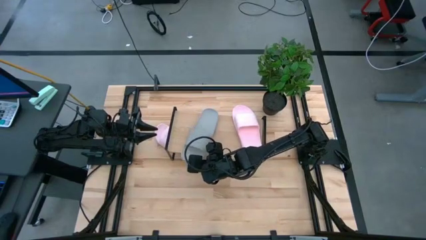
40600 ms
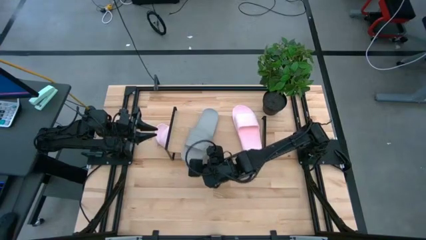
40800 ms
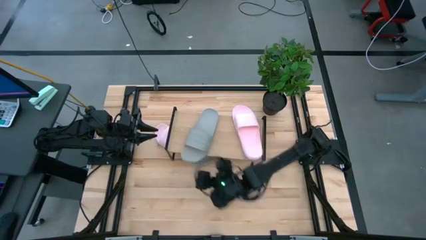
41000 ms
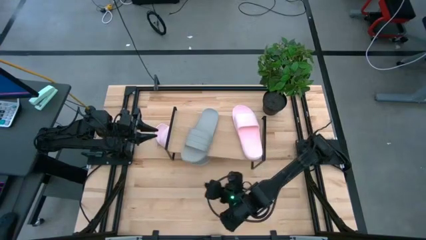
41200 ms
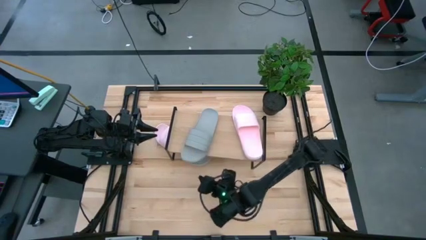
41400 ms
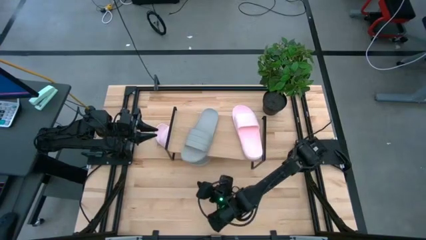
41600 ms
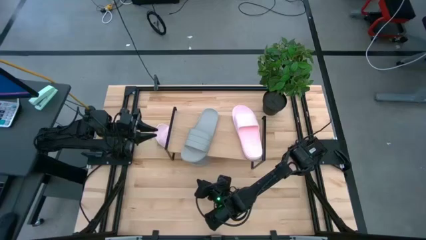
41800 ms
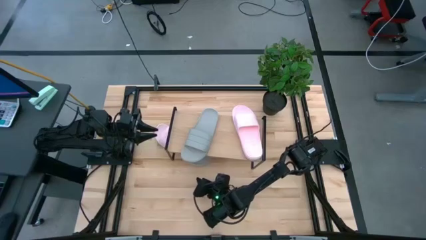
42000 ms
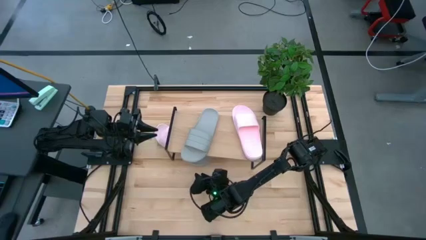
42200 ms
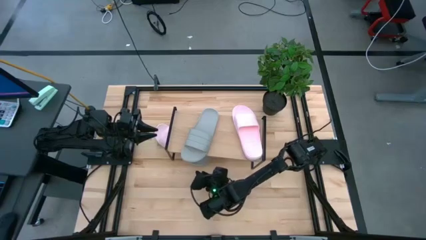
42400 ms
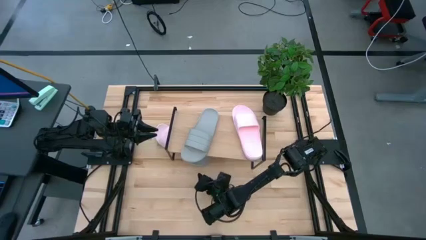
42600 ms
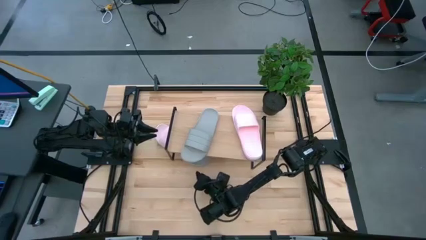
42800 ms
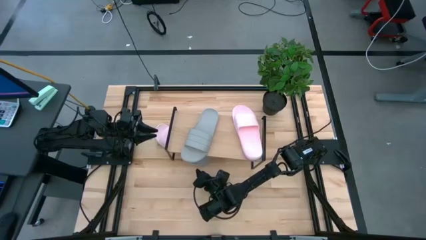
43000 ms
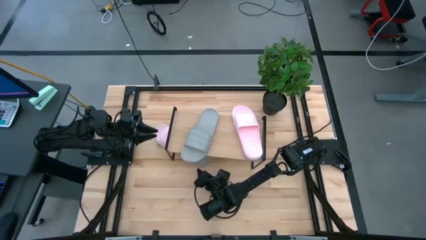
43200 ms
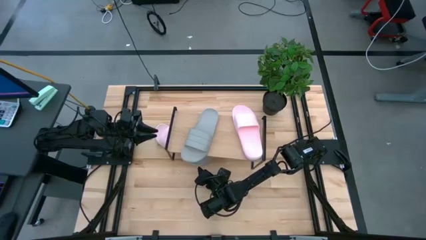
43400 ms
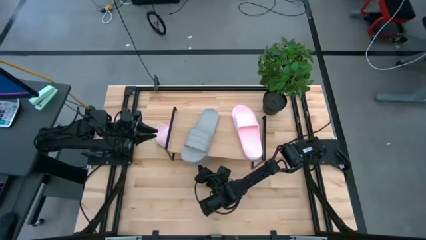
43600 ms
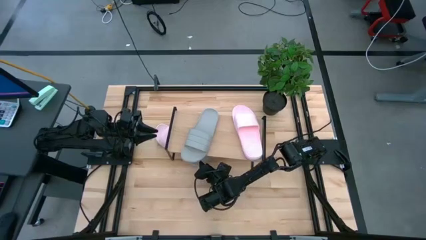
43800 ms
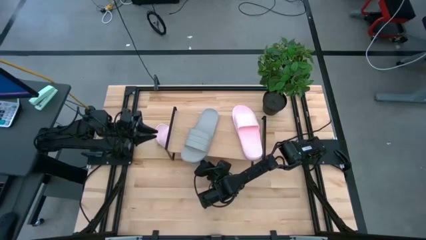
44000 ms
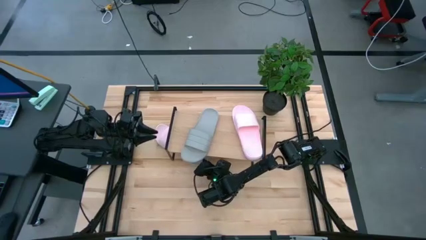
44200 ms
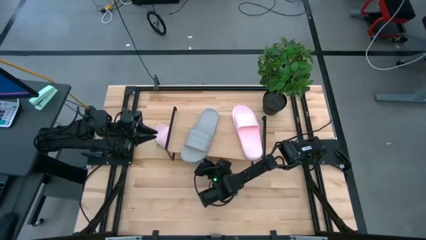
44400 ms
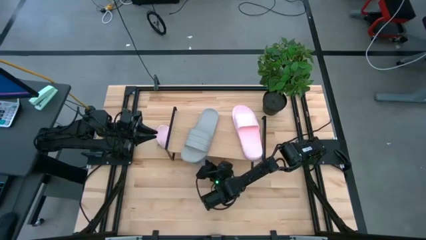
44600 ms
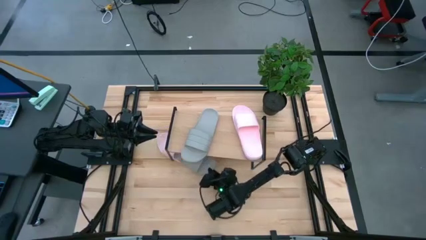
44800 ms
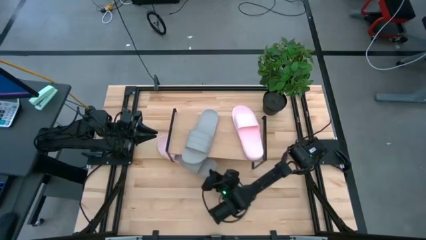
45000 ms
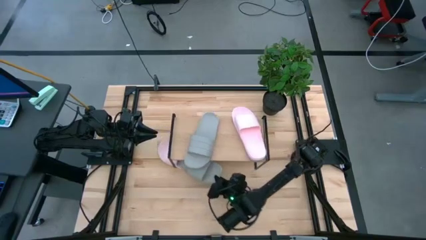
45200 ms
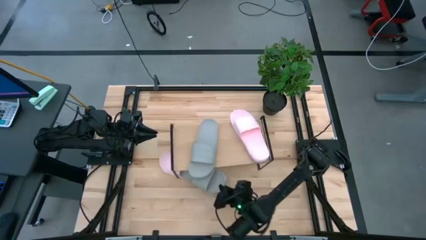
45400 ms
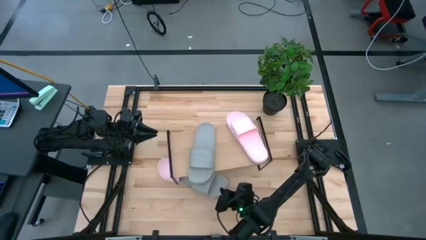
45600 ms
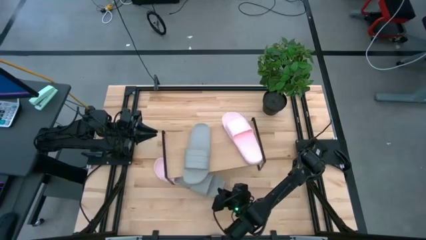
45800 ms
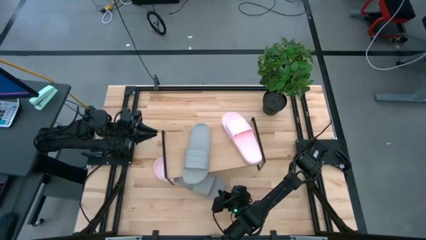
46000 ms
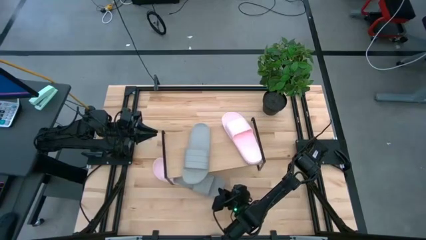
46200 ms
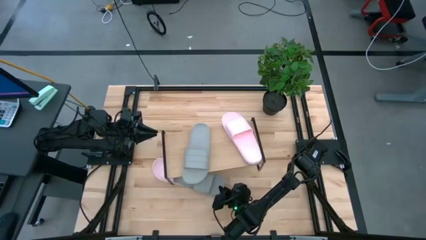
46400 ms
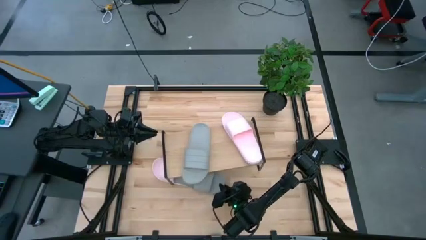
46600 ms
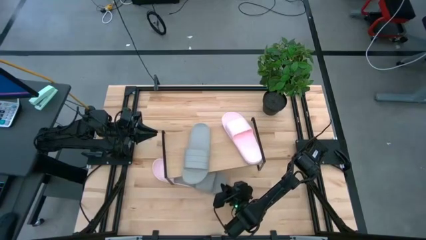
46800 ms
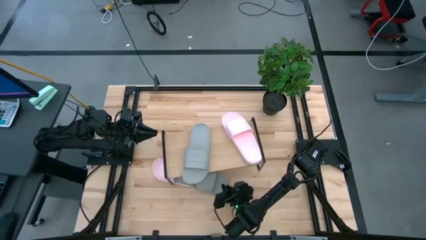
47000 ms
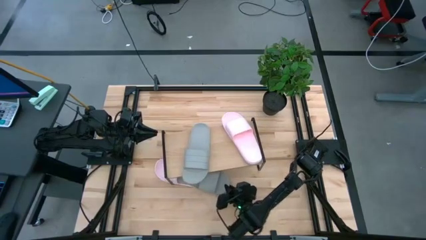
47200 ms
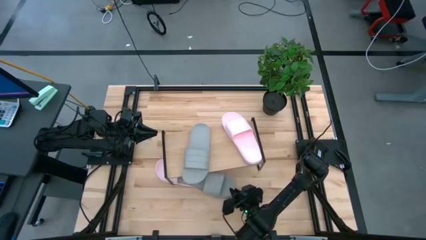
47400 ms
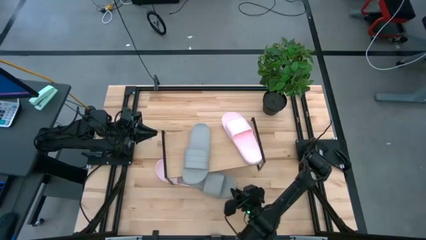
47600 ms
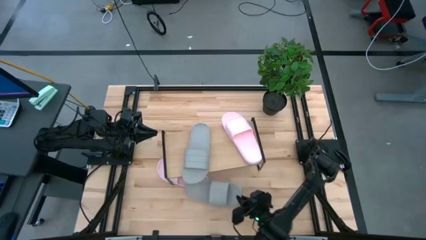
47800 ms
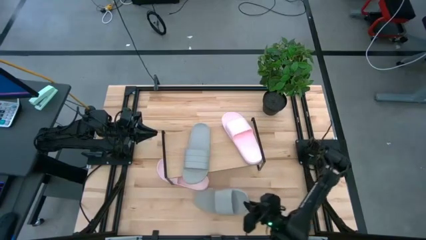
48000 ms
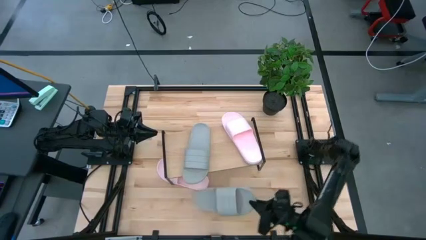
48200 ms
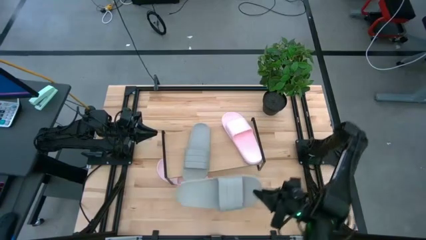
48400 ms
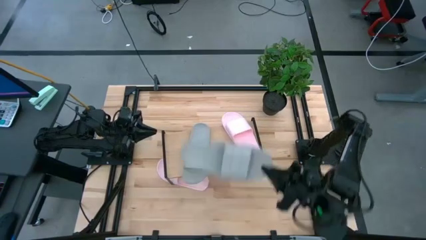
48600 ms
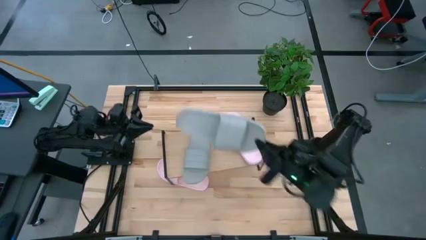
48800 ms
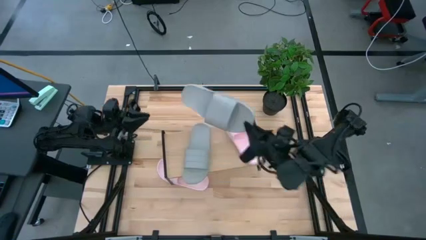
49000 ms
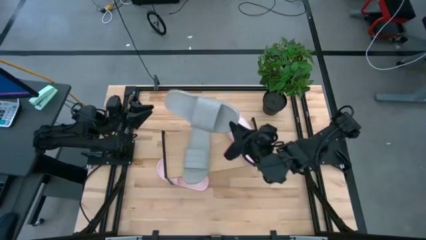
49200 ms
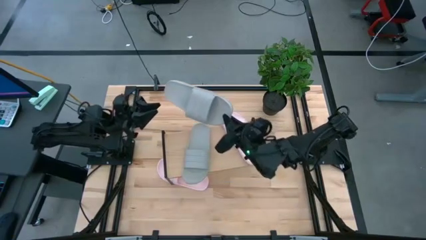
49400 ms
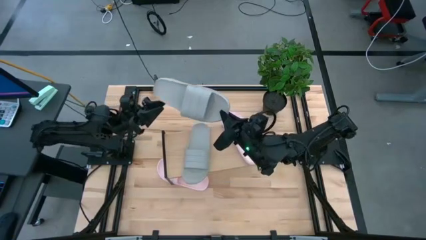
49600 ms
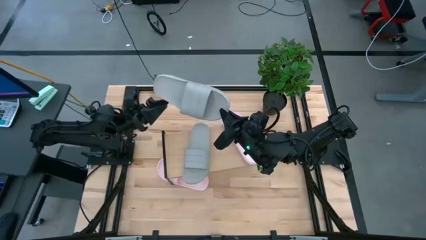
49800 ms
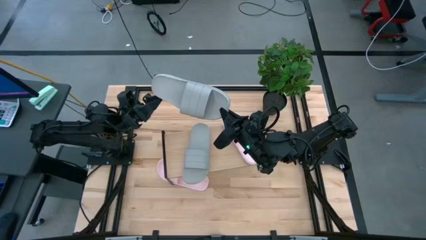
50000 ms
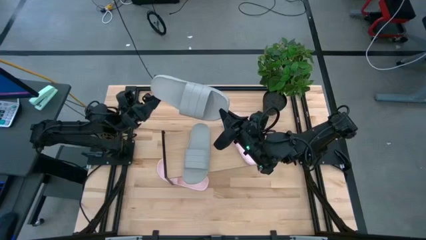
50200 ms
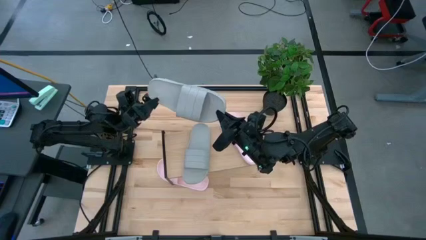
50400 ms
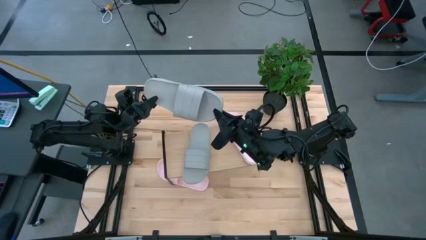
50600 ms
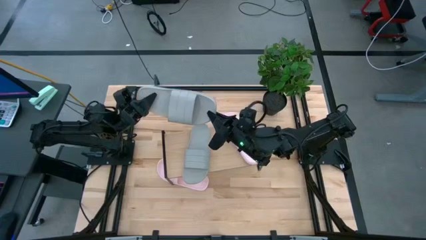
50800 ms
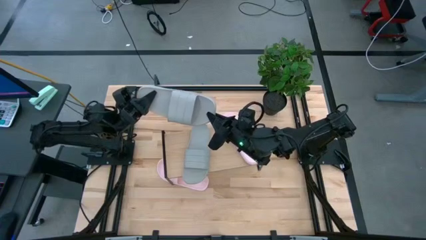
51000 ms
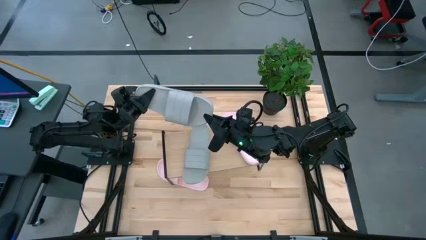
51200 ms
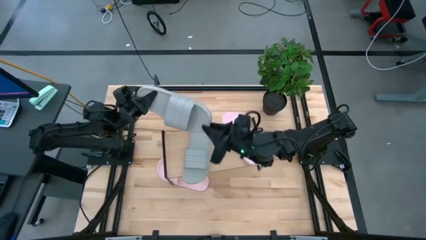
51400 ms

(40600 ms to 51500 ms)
Task: Pick and place slides into the shelf
Put the gray slide on the shelf

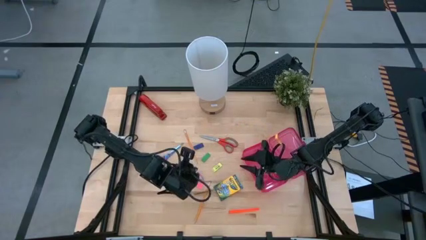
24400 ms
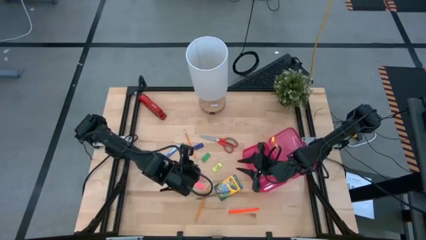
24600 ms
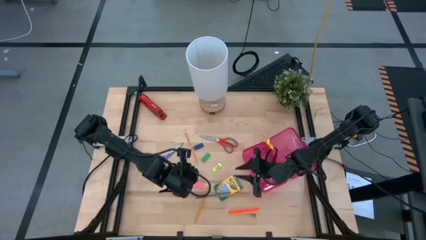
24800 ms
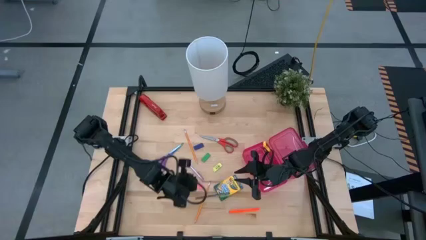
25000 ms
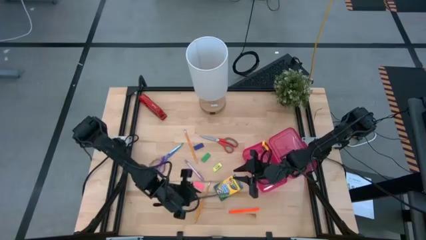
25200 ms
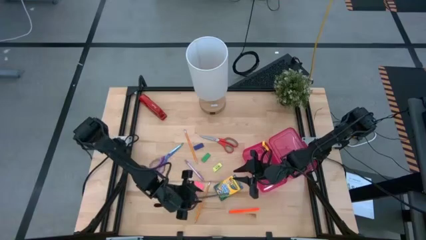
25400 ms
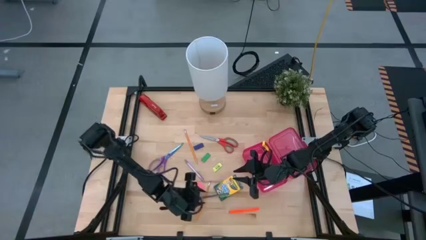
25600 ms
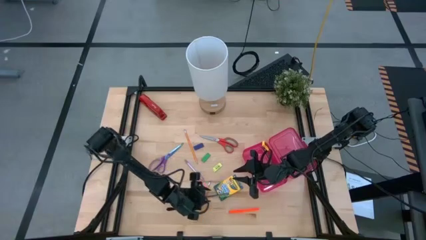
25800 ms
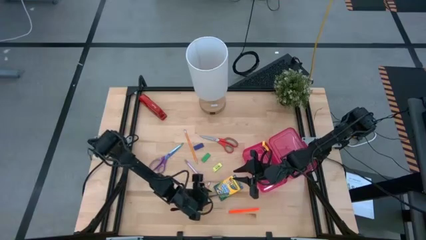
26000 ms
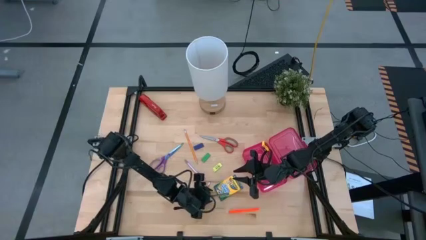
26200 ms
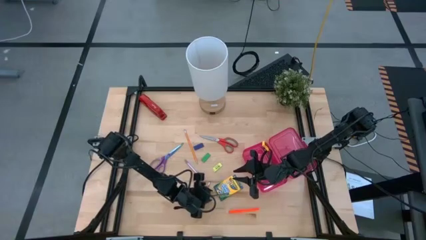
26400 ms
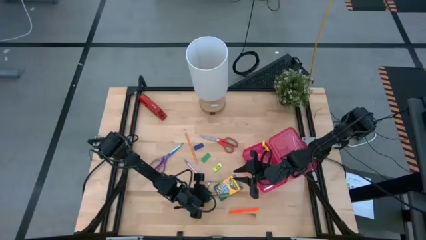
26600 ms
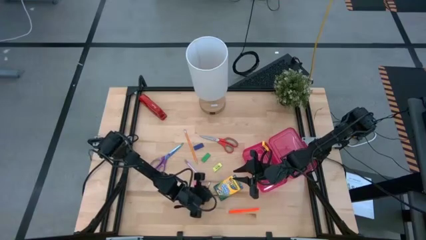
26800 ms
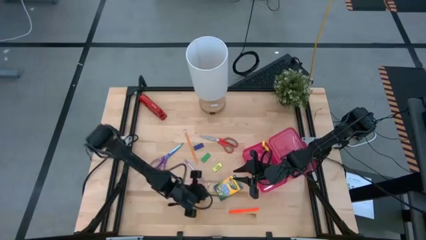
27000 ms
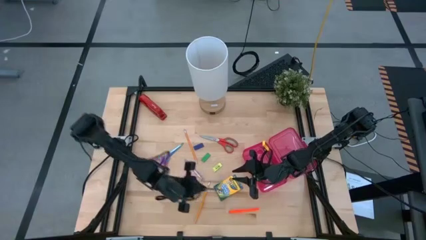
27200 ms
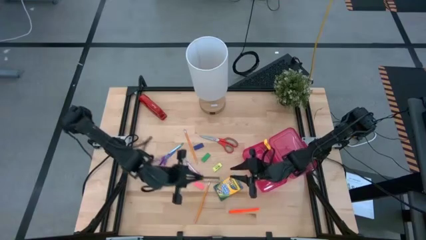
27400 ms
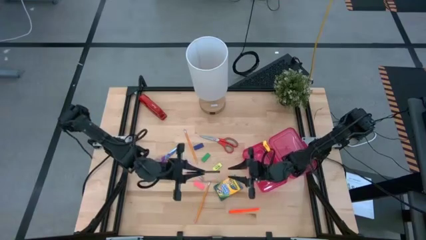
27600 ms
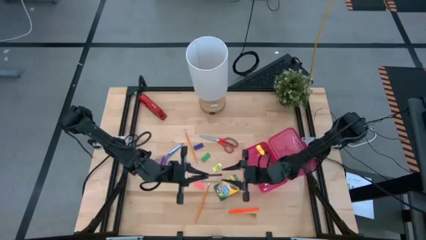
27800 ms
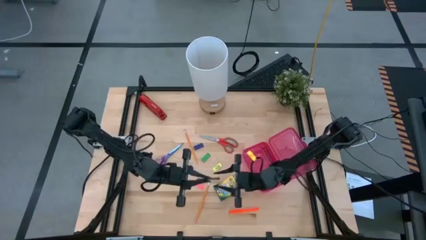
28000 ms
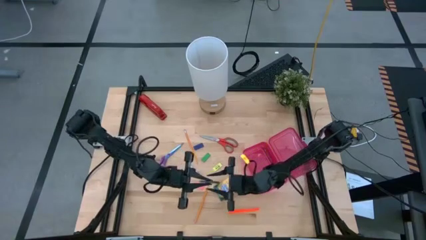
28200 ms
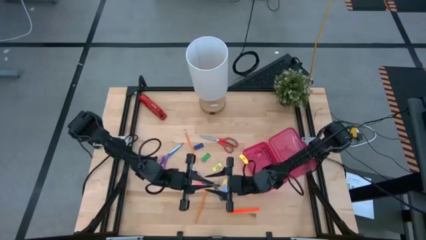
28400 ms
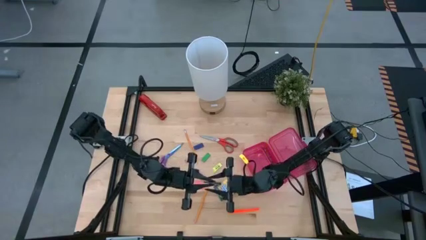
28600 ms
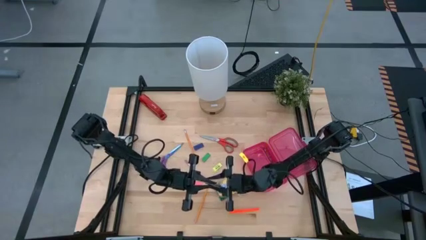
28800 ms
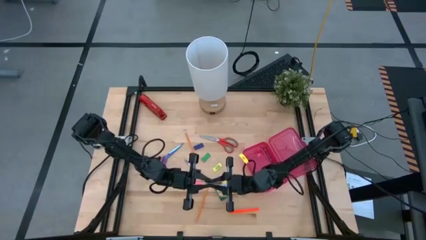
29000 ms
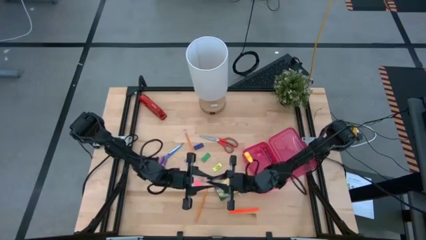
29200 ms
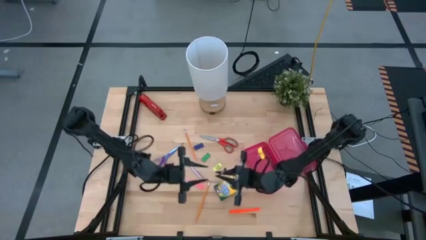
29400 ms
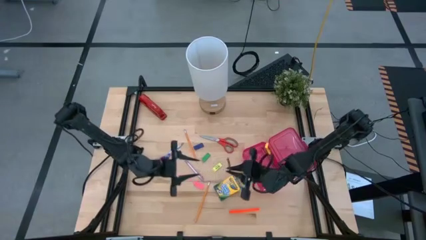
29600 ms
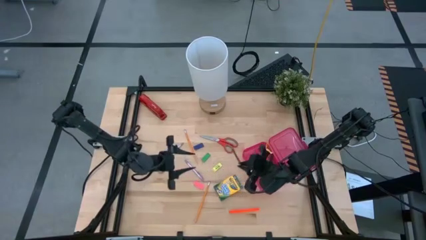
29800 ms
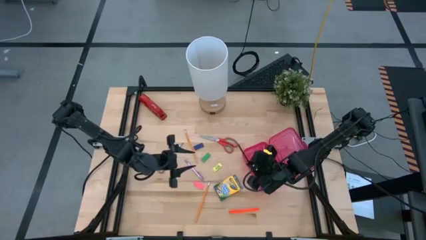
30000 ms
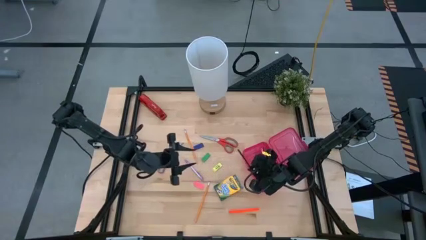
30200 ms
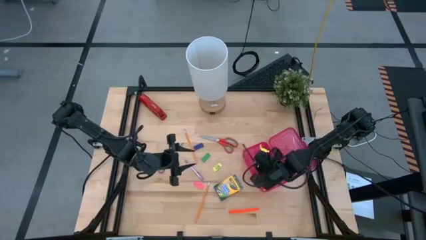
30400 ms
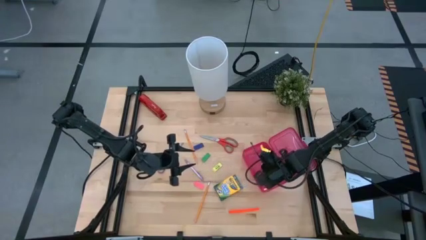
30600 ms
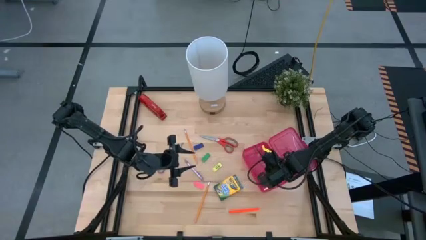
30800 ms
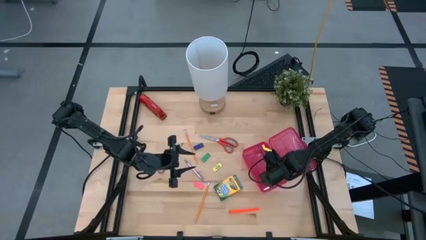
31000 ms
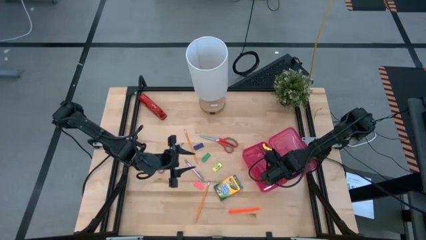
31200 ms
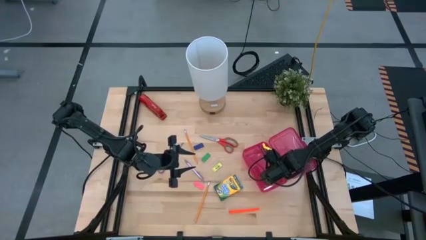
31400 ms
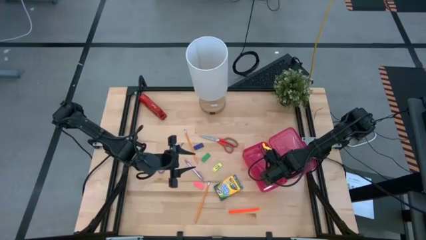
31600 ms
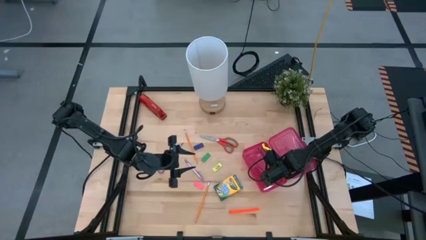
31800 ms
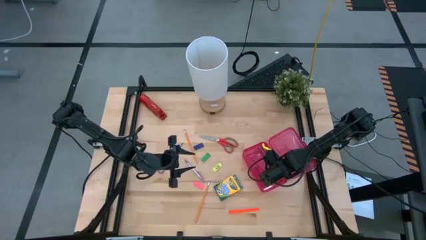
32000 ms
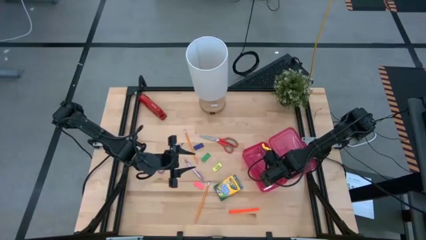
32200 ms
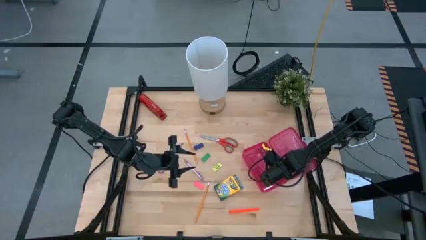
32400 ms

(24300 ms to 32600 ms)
Task: Pack school essentials
Put the blue pencil into the pink supply box
